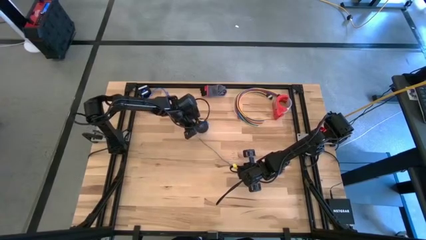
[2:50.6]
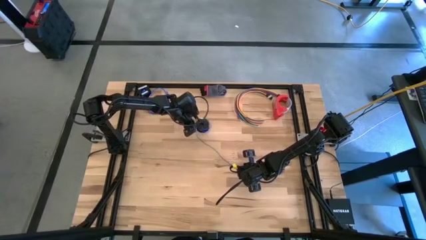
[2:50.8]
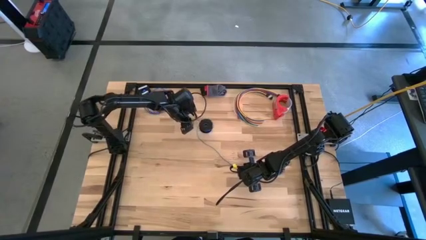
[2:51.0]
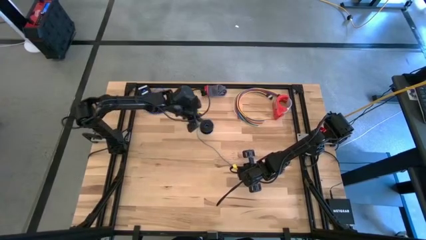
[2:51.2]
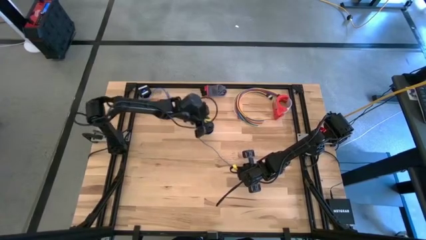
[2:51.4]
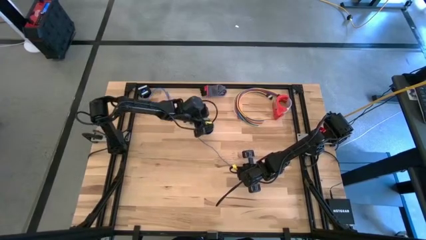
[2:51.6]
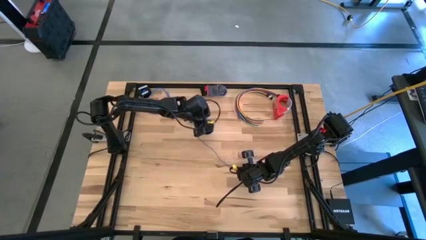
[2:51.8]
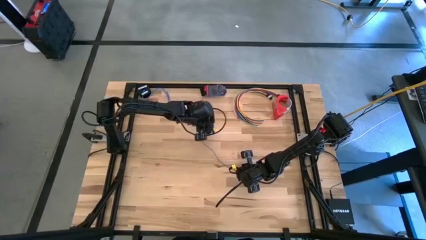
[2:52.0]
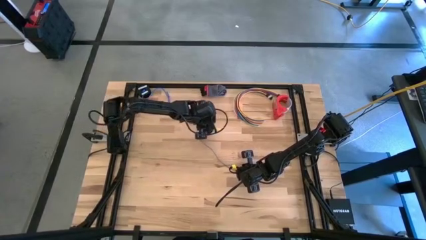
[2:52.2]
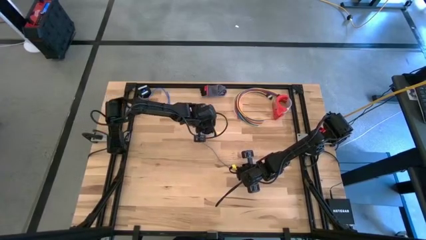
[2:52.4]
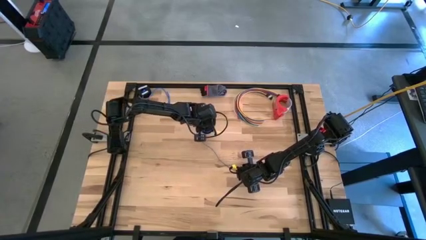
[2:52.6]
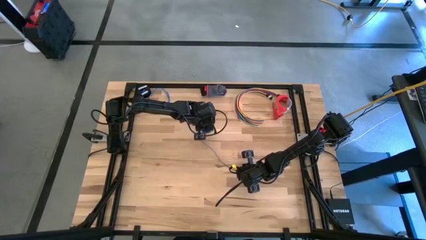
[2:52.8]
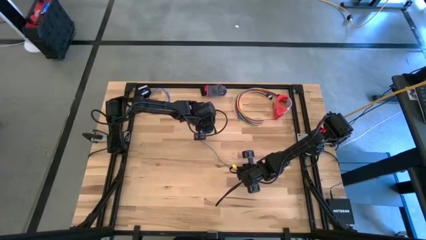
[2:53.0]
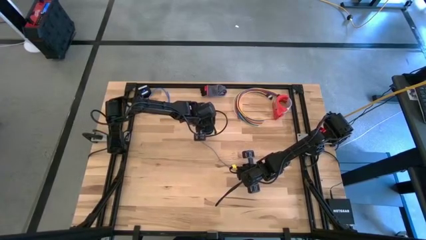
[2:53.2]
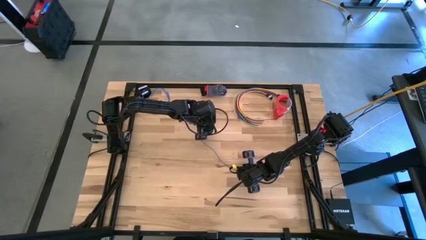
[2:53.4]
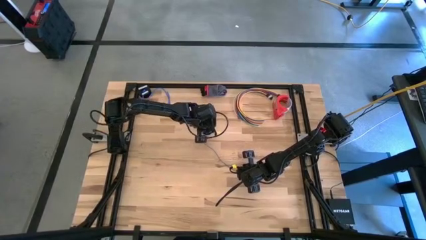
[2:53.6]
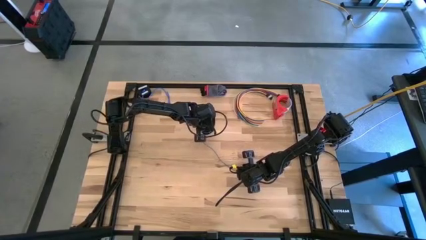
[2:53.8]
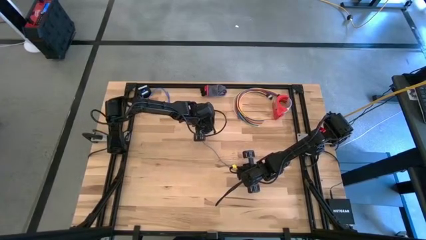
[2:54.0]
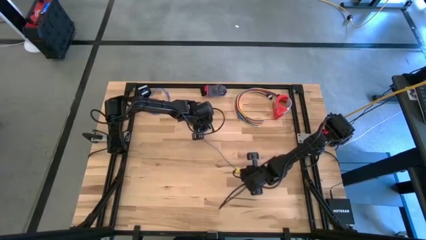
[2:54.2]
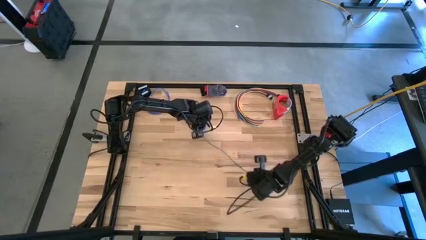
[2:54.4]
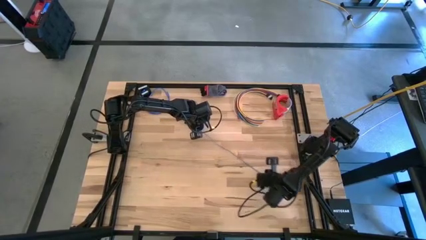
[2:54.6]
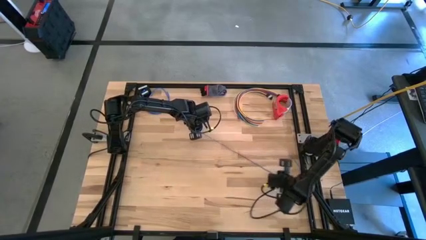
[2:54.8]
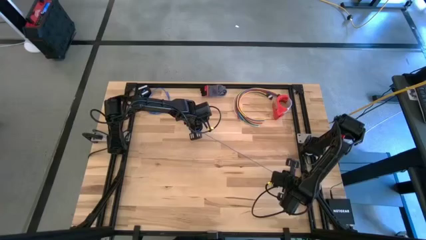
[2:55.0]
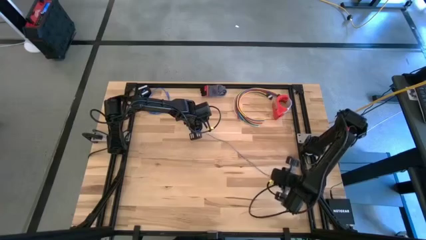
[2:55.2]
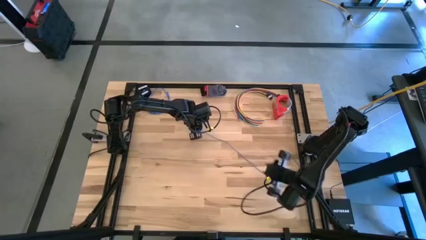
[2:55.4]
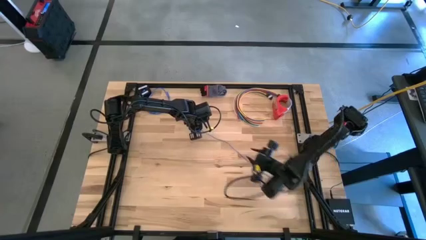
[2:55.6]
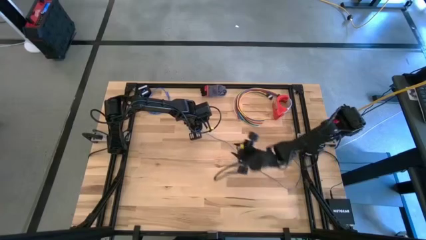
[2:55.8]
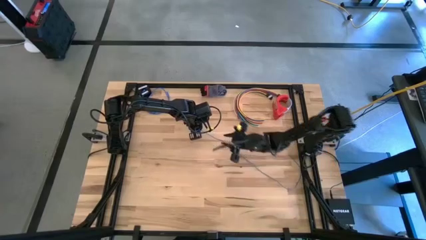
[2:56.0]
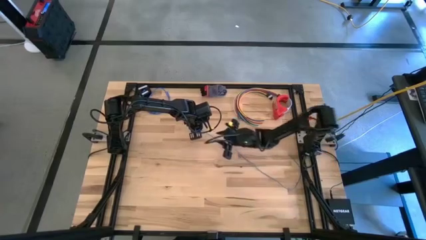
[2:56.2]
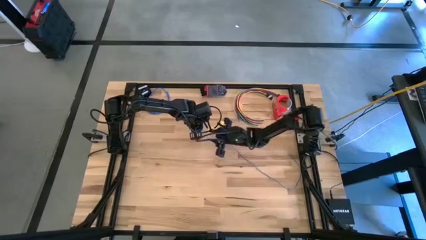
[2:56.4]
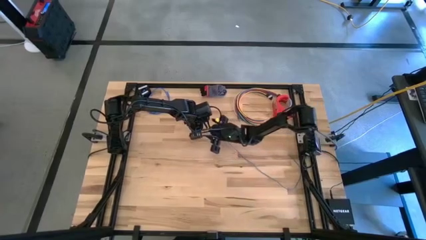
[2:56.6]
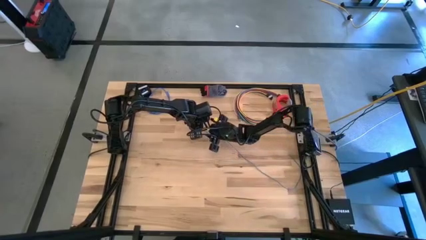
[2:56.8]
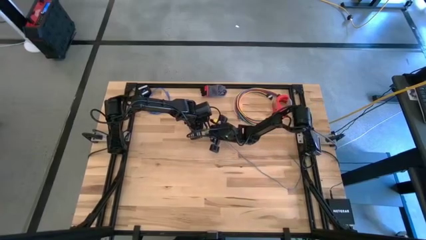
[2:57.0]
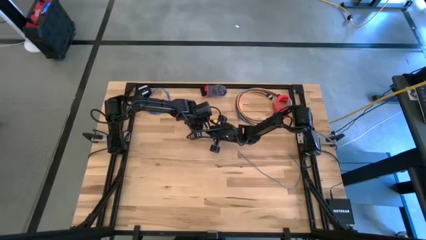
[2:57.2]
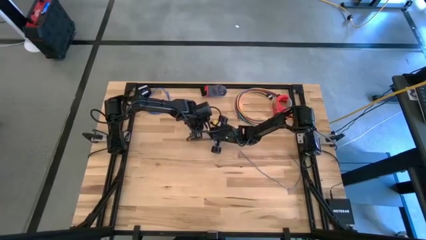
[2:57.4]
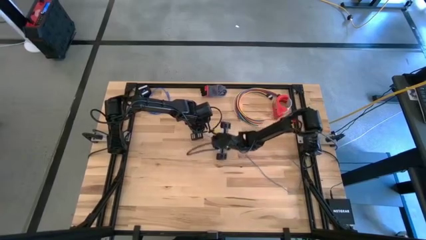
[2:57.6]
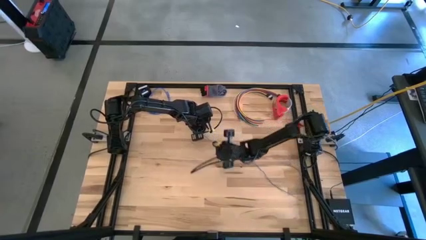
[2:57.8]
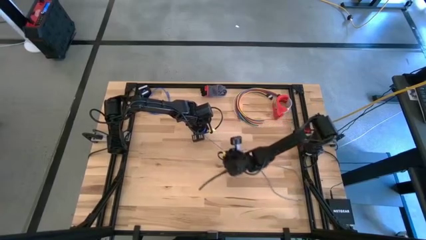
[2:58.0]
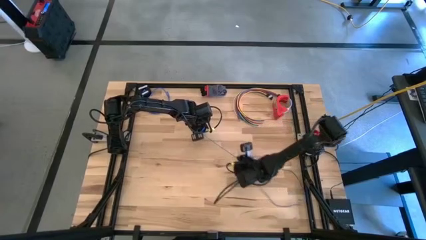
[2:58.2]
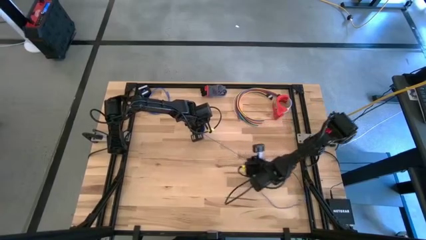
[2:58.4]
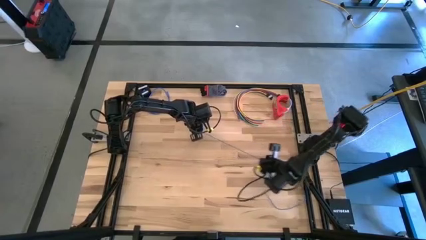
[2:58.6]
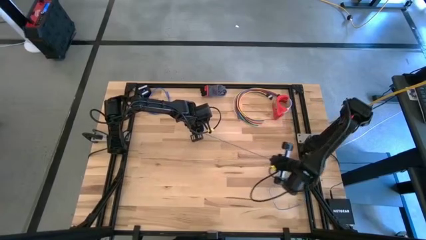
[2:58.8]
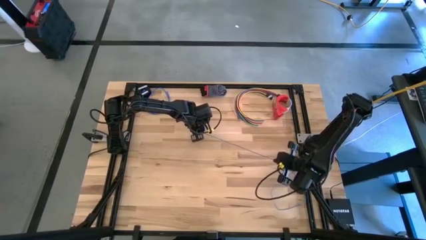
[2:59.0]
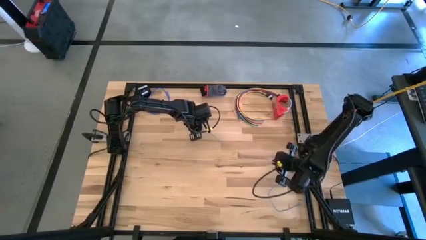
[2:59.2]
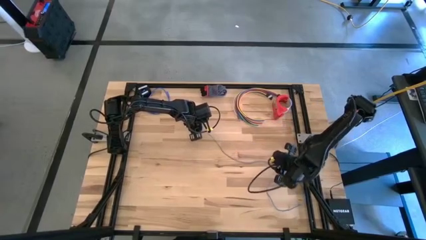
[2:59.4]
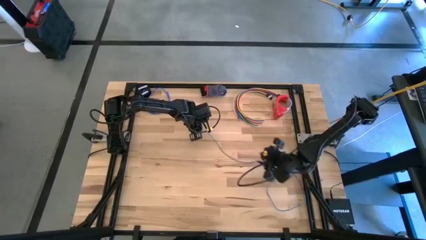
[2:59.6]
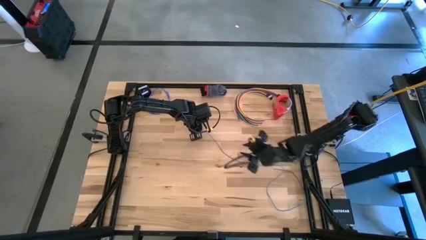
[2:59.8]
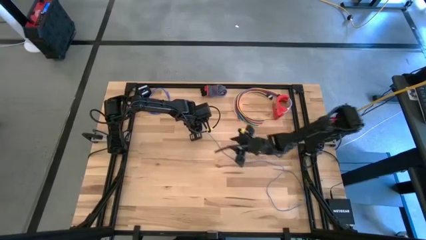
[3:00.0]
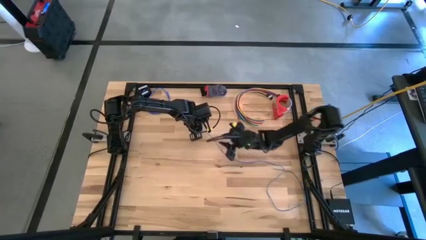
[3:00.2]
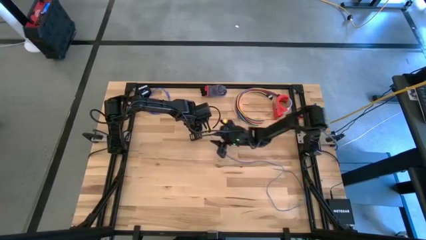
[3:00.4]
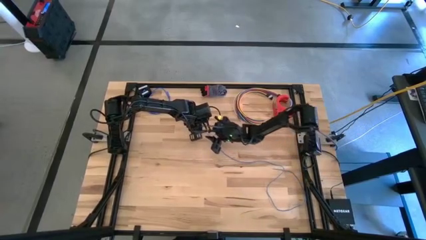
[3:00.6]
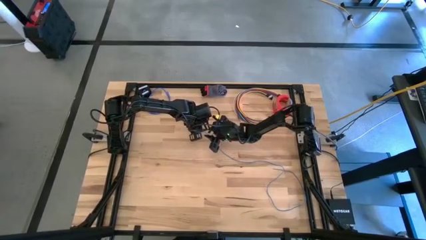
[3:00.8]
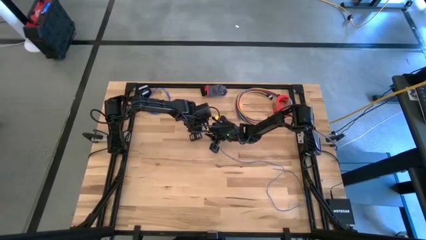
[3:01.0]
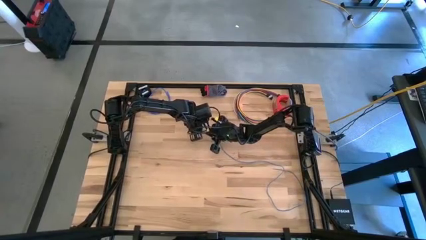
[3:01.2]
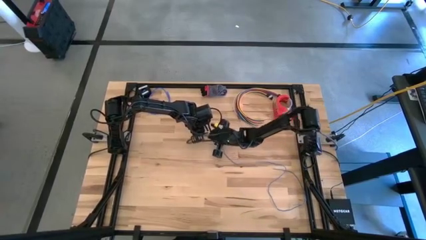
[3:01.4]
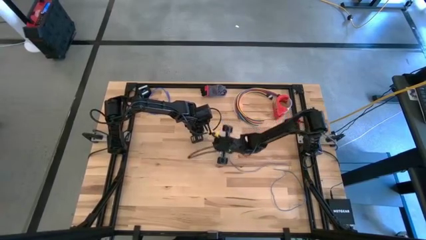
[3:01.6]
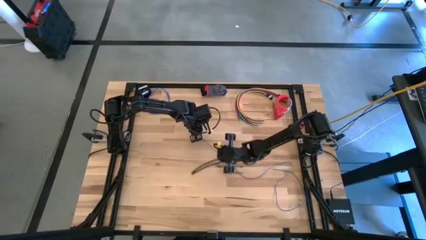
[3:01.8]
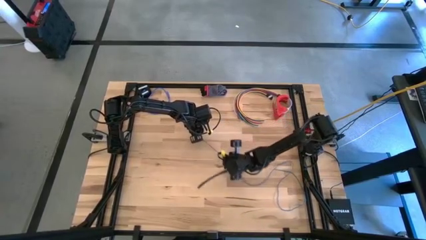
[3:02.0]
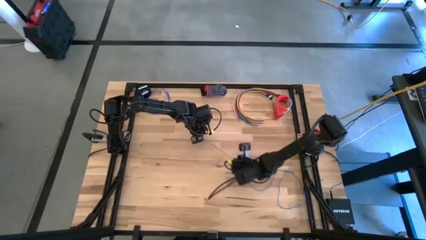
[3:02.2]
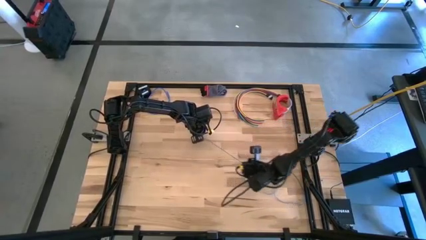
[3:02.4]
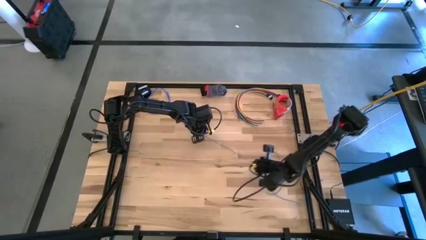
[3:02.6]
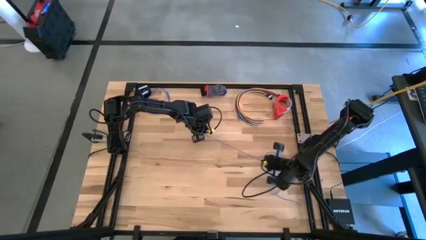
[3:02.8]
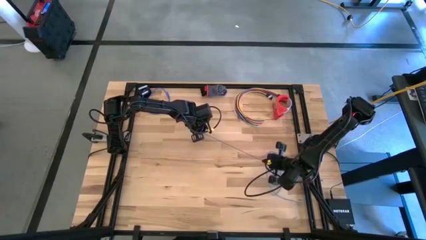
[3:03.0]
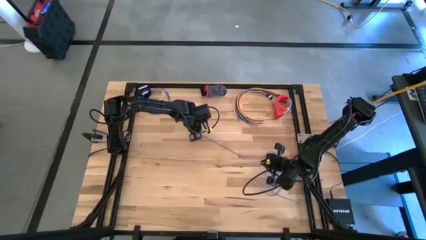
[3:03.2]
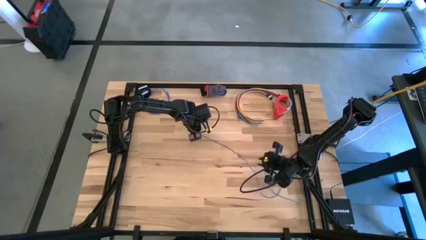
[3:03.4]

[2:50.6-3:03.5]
Task: Coil cords
Uncoil the blue wire from the black spool

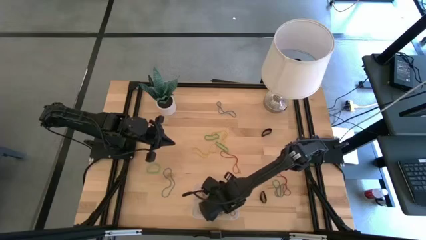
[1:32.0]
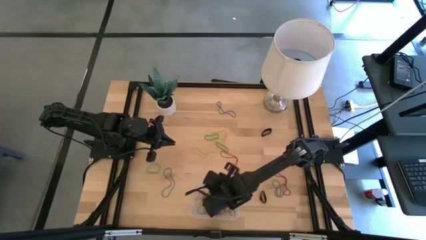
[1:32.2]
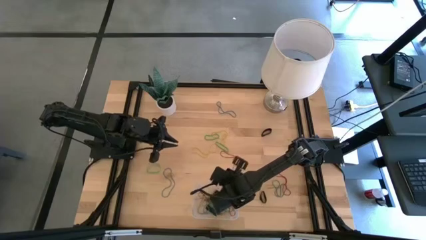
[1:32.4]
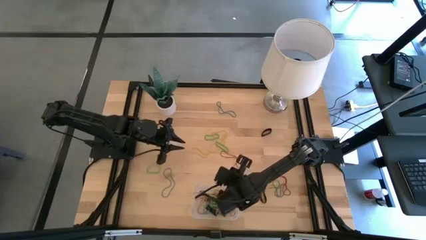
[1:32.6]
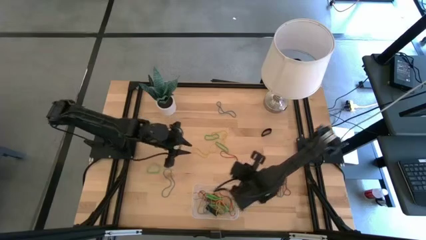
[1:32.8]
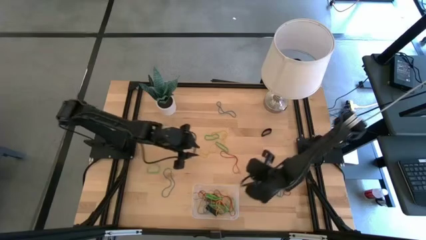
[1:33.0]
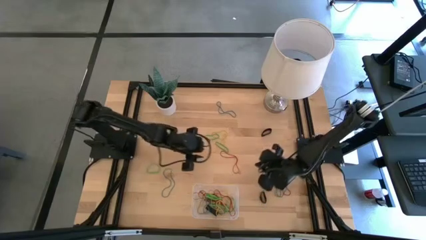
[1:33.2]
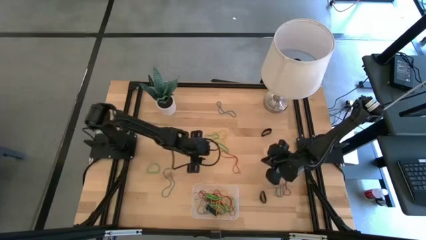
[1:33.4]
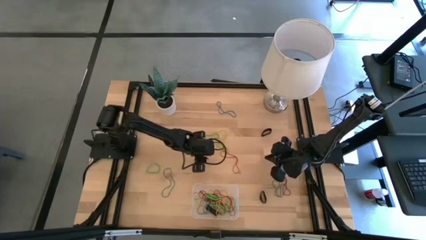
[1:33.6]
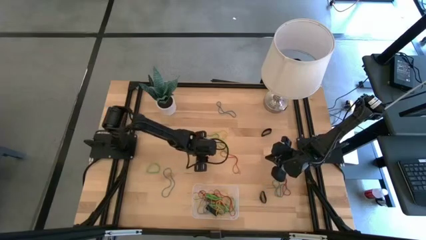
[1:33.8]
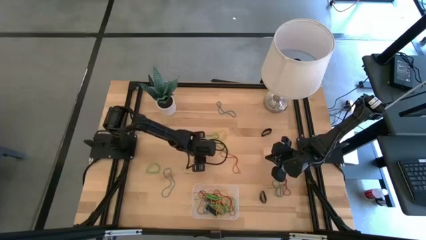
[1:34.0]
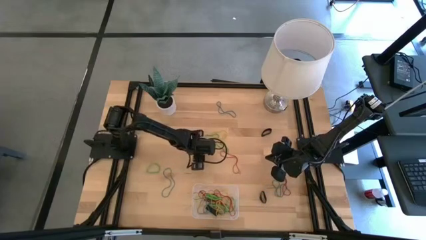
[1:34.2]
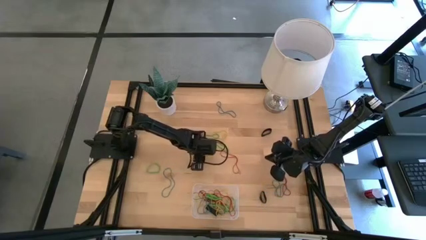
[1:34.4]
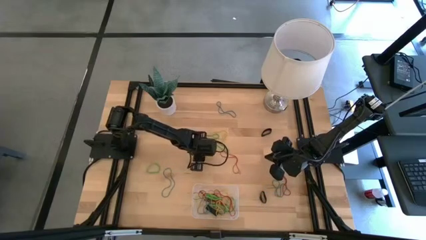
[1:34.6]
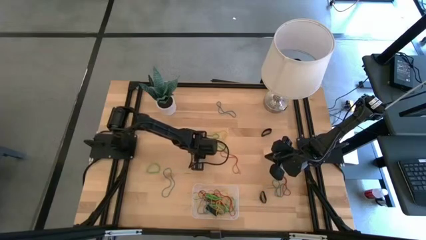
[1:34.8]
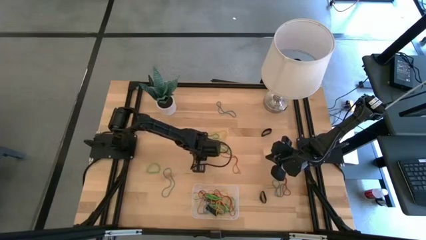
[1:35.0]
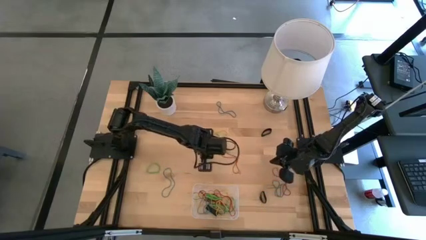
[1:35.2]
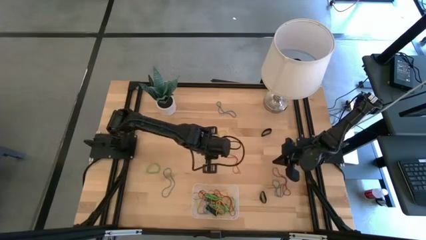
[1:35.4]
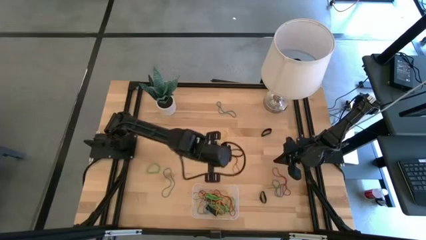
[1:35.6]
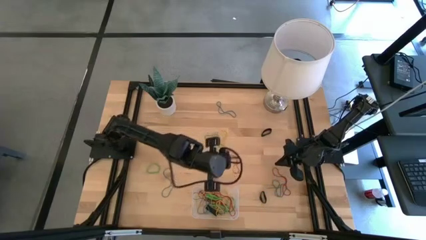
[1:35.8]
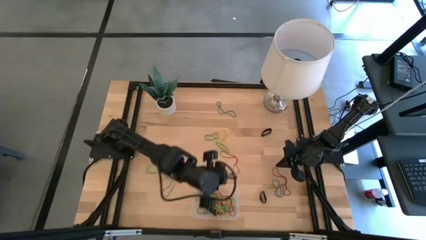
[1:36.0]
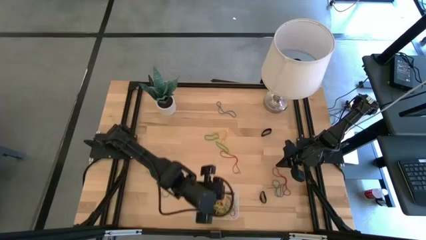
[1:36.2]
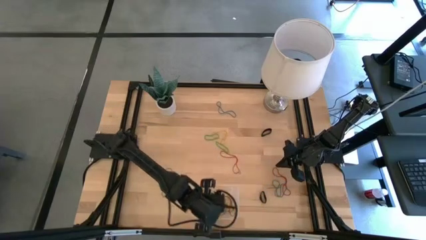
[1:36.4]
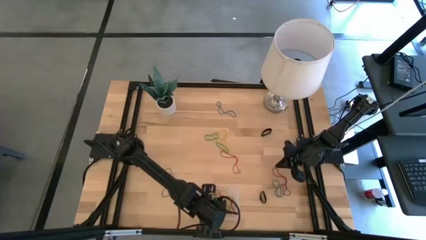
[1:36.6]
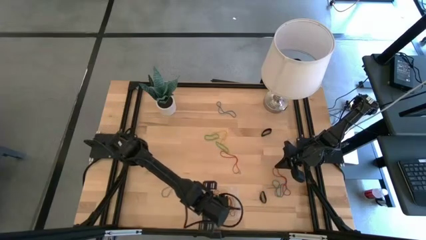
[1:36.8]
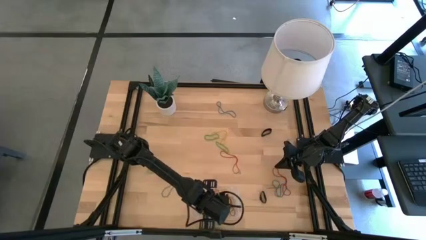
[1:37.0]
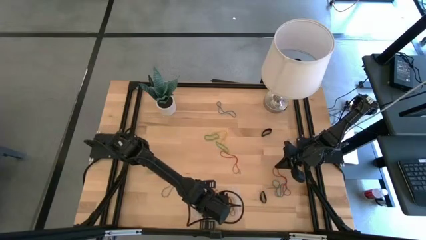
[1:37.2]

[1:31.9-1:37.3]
Task: Pick and place rubber bands into bin
Put the yellow rubber band into the transparent bin
